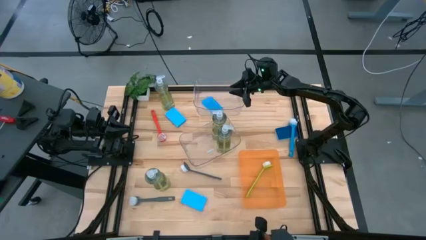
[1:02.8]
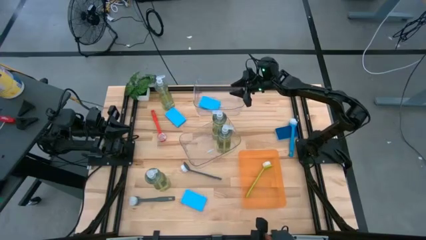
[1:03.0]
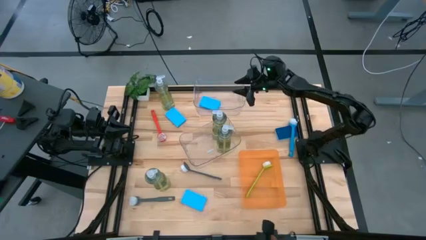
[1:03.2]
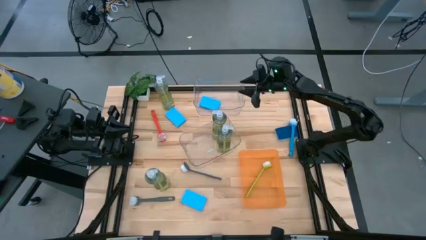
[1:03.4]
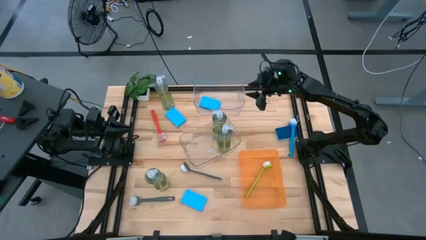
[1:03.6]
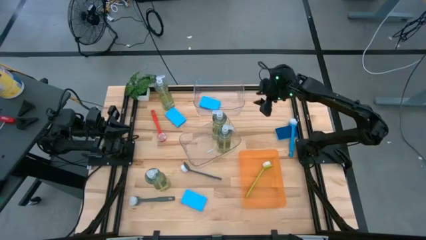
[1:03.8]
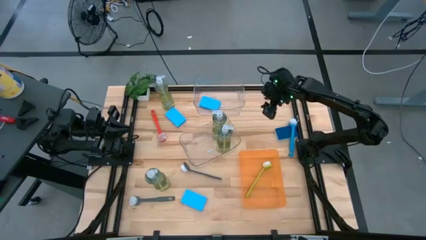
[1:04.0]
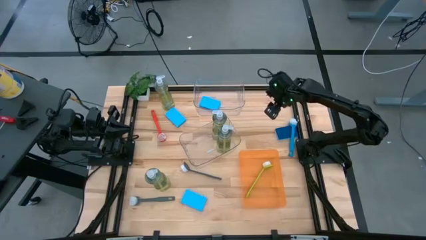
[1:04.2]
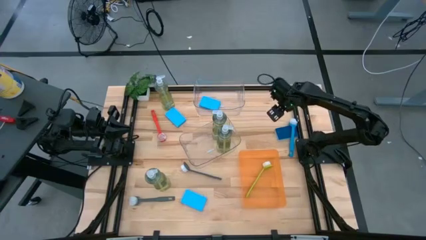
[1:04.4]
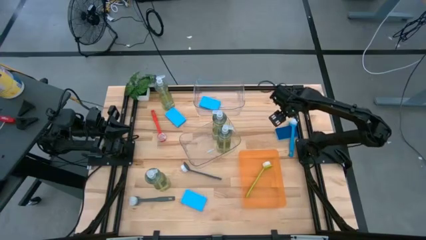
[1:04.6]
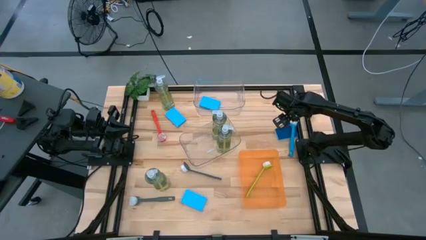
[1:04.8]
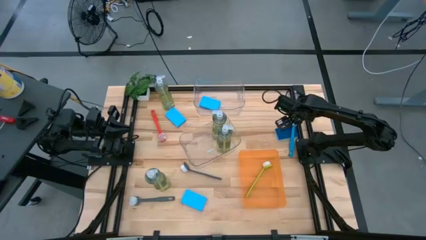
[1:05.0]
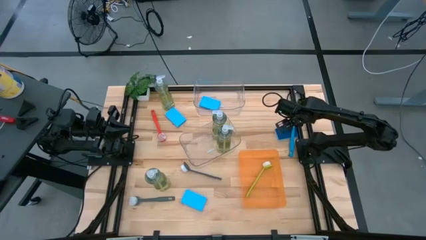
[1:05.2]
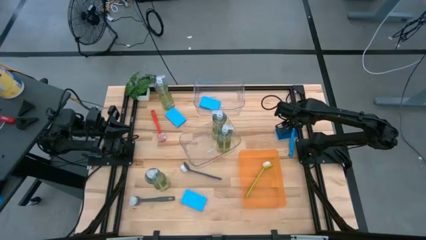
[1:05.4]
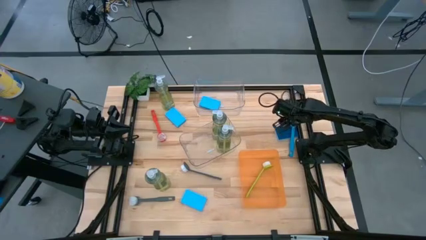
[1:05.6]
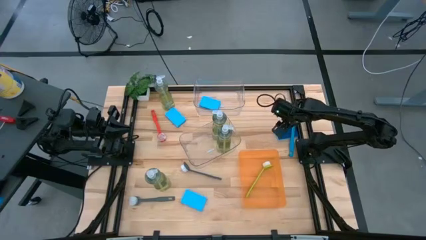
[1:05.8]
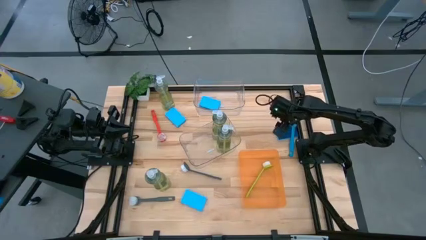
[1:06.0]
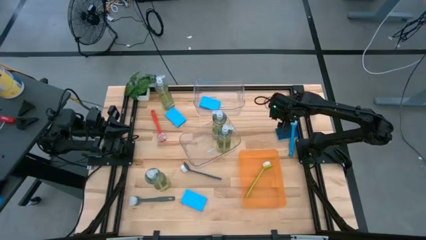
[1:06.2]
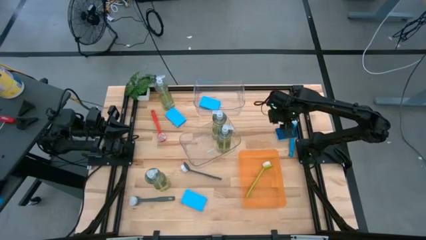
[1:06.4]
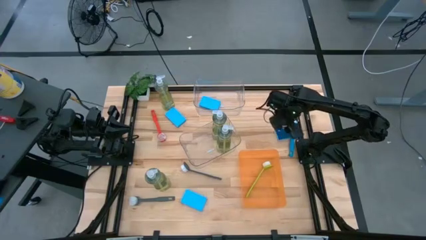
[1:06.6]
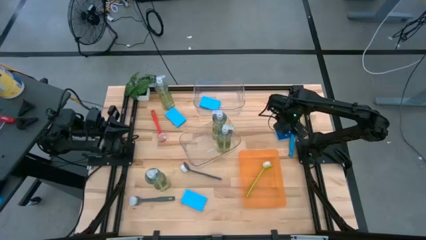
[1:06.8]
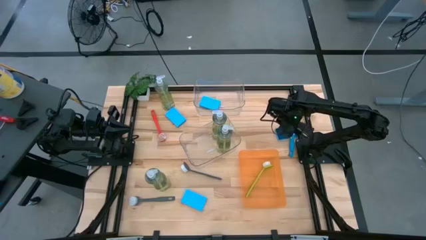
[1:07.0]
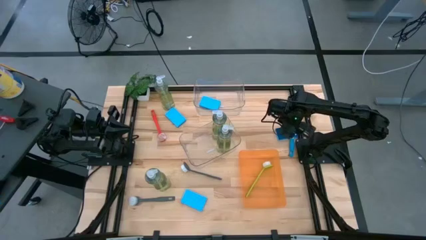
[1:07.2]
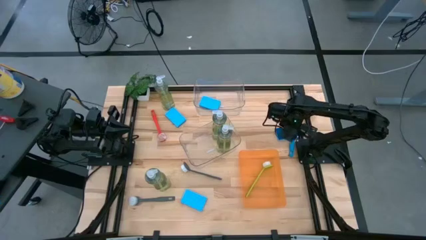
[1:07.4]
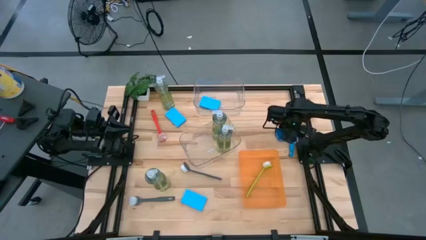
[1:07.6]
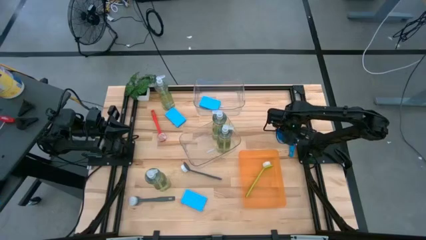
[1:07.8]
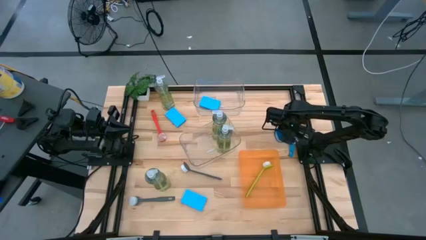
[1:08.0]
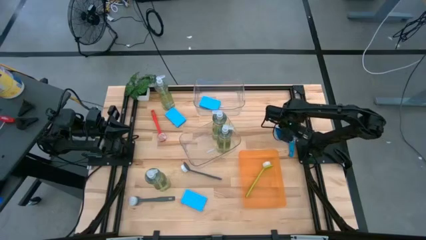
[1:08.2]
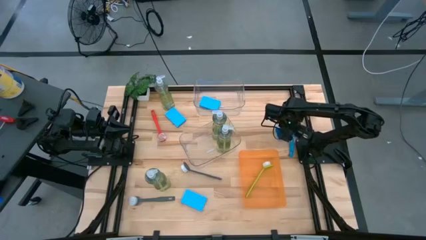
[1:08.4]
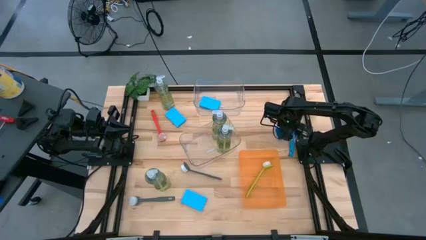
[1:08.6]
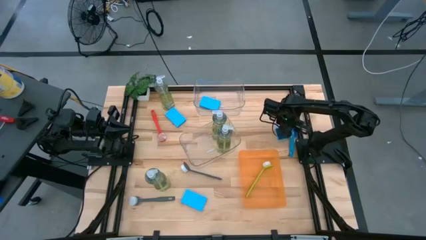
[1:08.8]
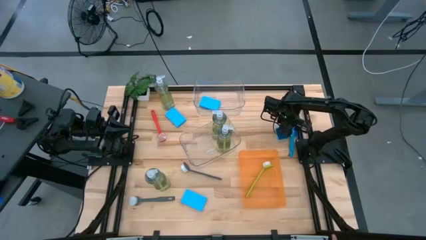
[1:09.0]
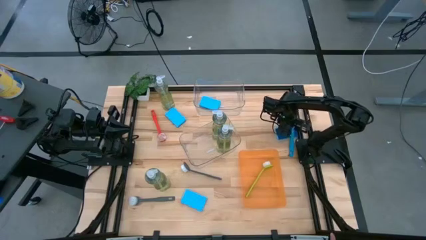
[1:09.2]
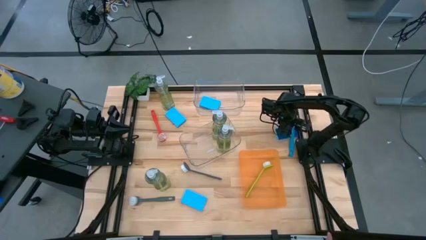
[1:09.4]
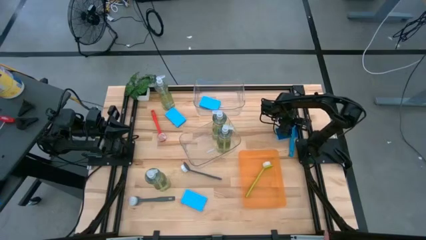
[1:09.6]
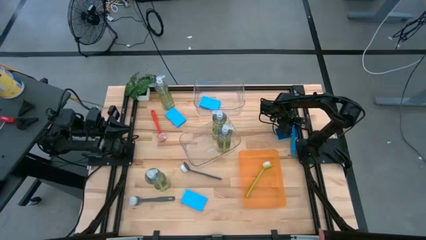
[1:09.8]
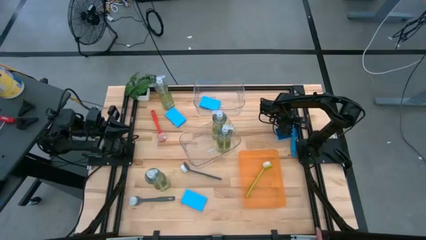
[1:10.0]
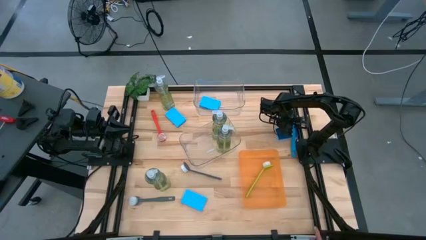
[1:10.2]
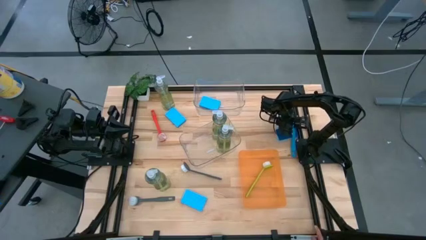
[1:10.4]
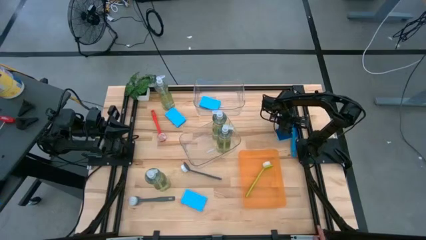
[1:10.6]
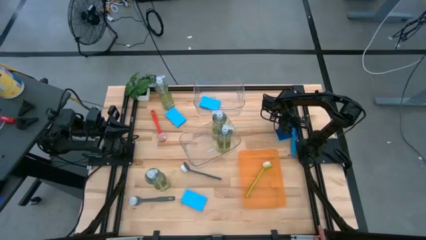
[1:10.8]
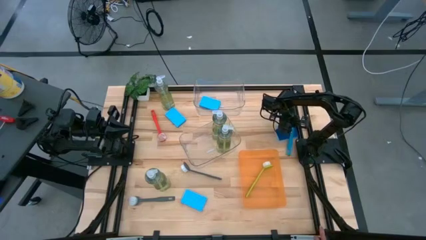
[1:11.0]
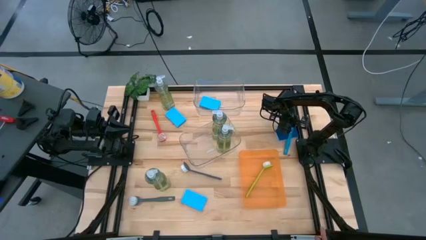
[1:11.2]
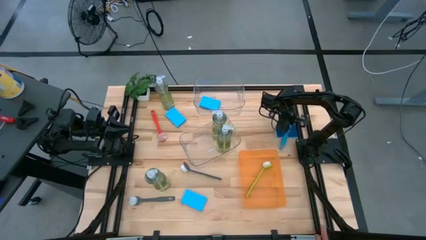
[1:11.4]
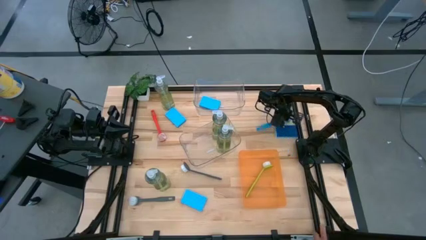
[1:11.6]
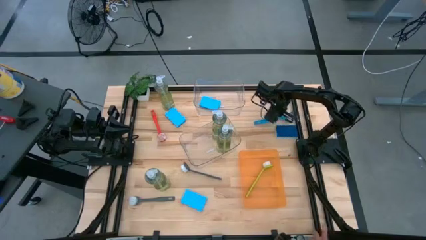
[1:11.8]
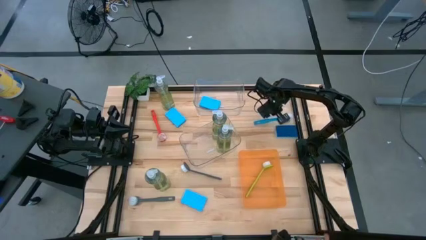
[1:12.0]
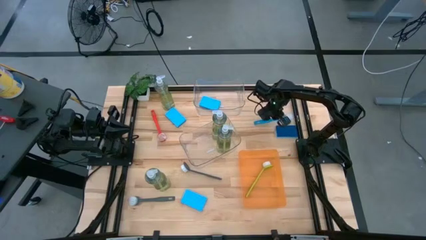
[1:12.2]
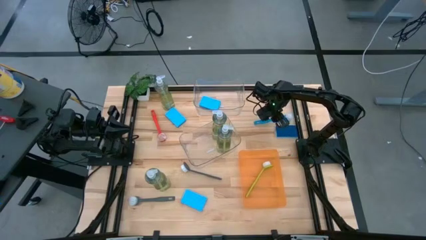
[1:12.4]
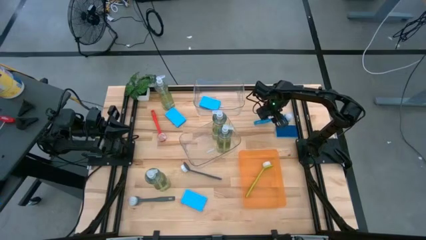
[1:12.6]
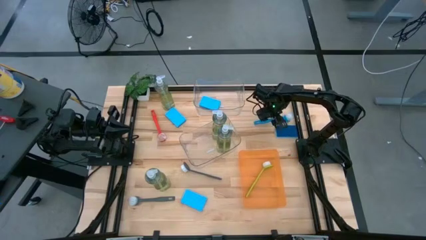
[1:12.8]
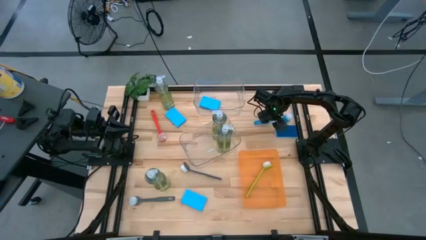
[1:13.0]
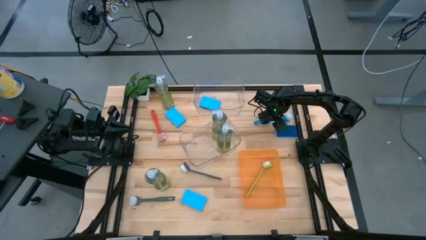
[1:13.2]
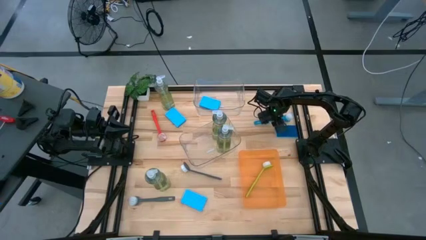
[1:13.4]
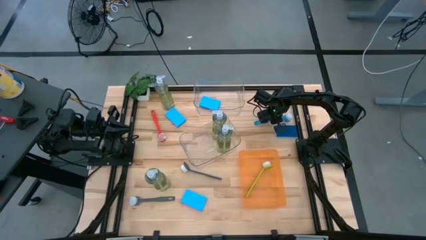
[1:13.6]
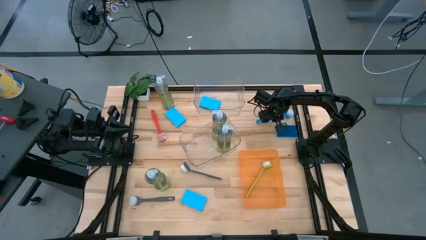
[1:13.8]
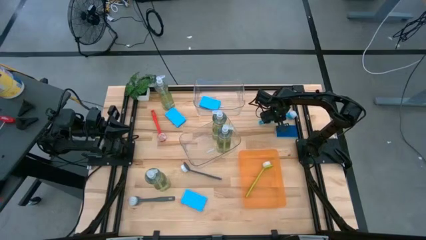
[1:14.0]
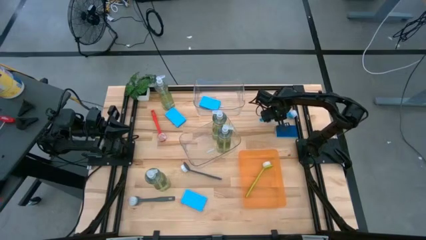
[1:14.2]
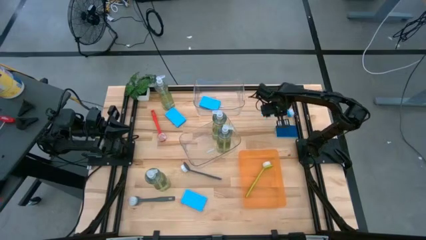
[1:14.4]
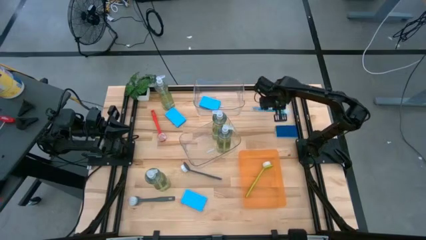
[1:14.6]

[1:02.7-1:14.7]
Task: Pick & Place Kitchen Sink Supplies
Put the blue dish brush into the orange bin

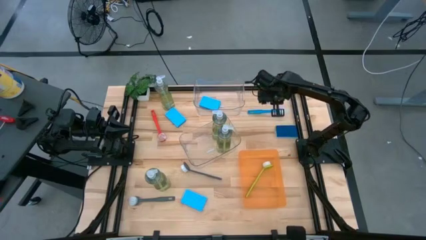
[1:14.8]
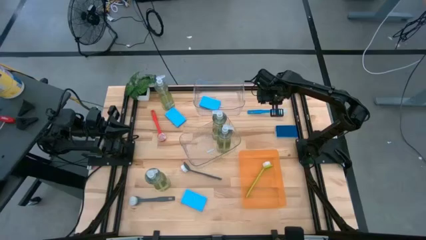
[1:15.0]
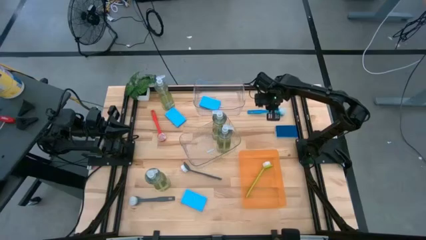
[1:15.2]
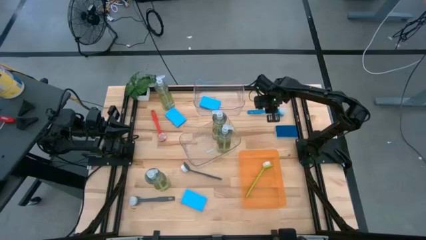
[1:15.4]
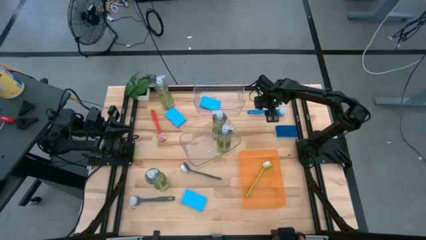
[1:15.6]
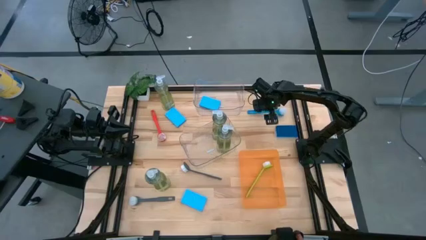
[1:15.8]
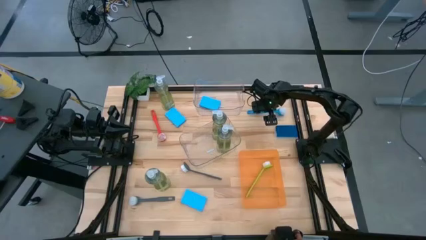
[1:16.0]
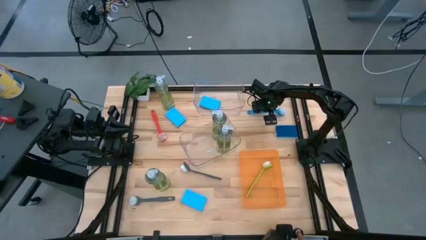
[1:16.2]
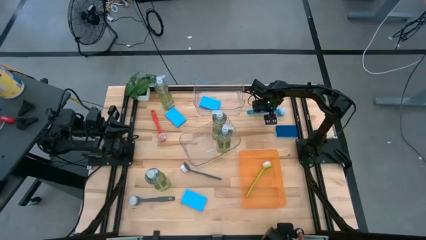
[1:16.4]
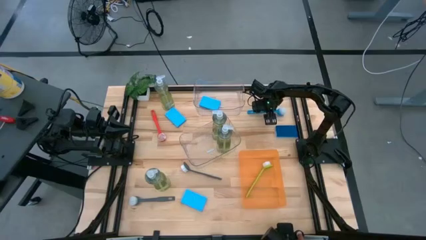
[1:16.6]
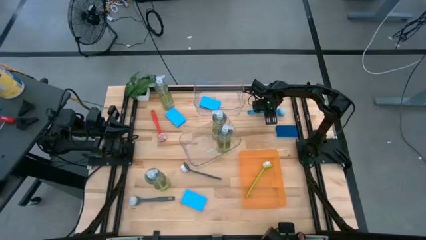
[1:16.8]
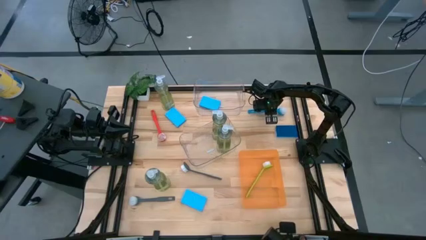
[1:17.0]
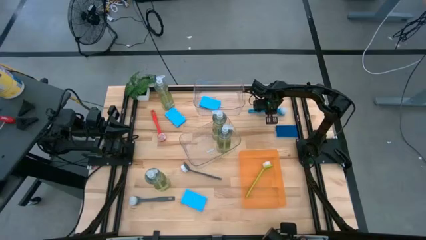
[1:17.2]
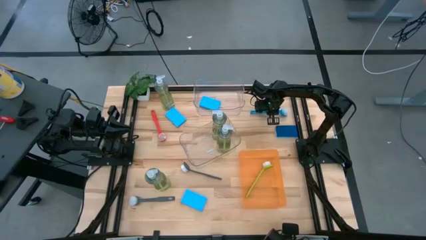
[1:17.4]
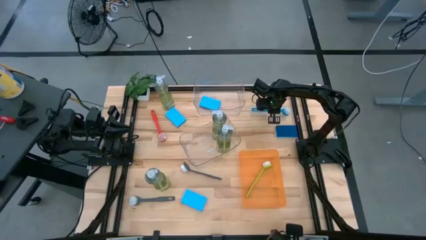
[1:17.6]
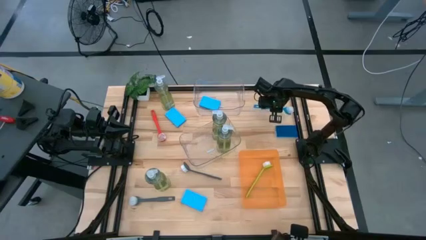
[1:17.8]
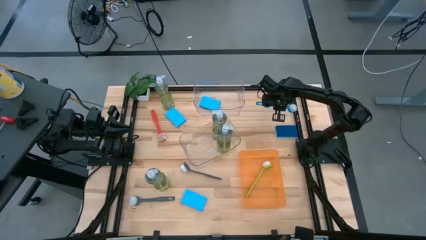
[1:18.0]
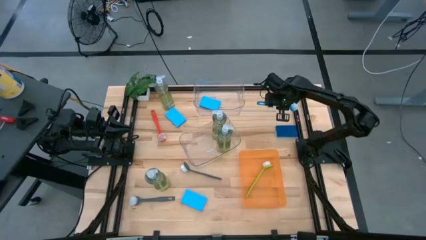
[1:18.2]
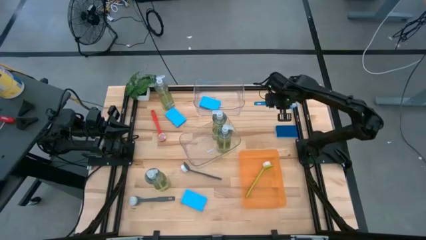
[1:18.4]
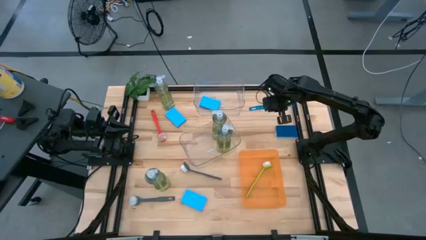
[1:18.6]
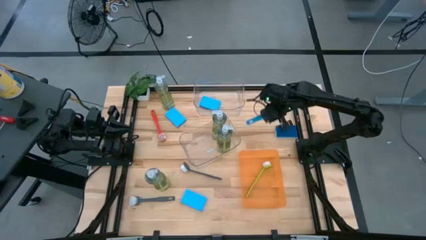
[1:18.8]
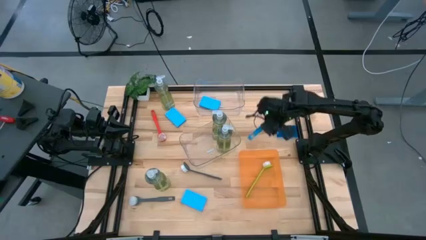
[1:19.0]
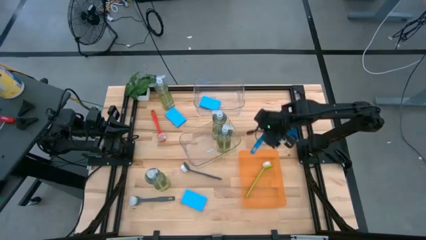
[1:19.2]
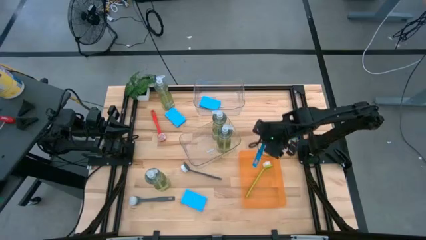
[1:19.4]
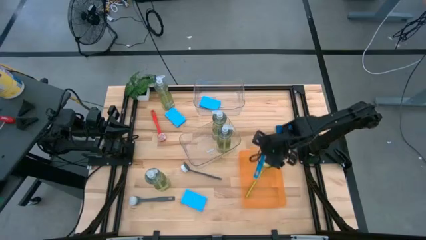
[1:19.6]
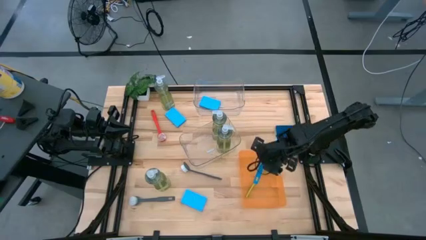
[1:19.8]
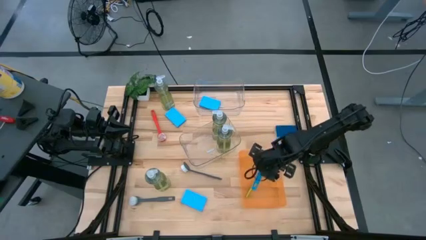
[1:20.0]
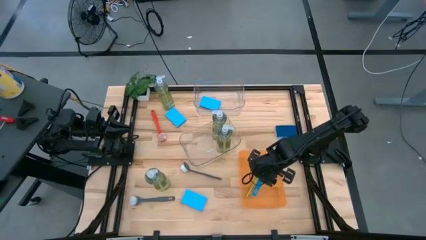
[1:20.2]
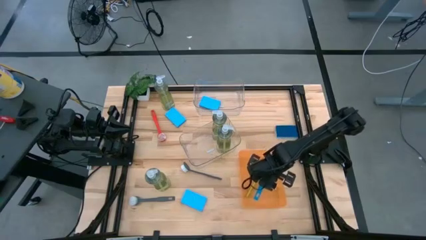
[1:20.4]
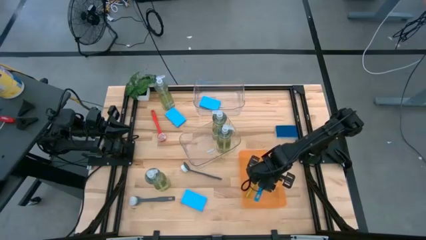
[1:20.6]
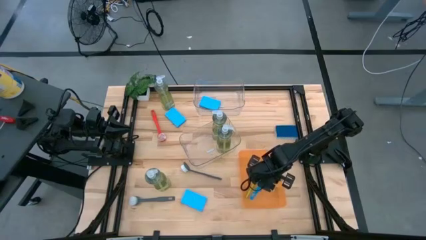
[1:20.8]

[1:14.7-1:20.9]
Put the blue dish brush into the orange bin
